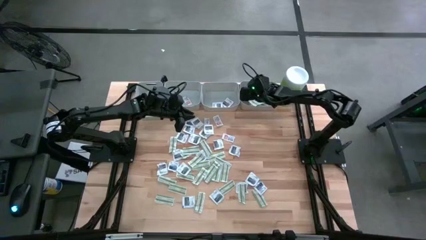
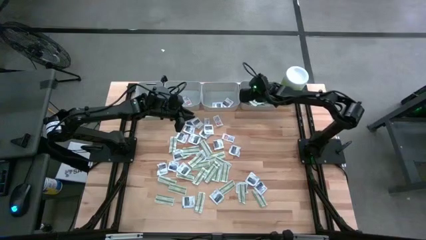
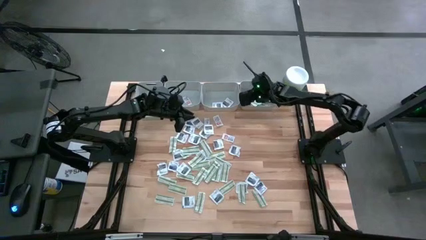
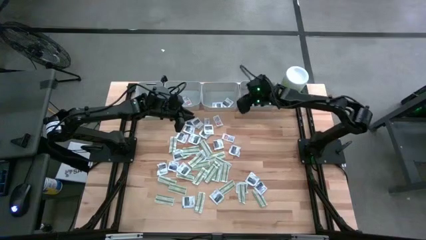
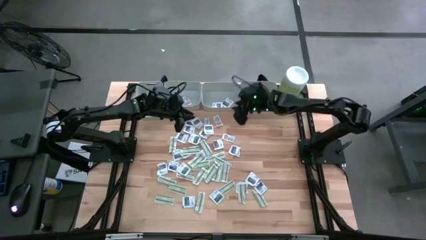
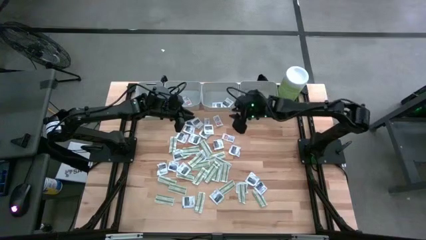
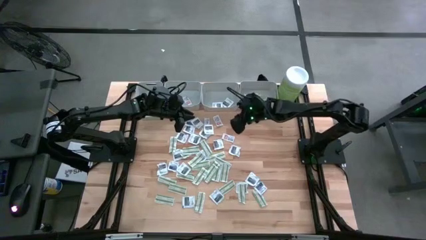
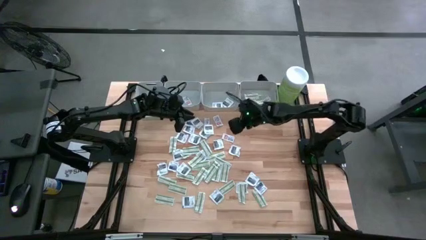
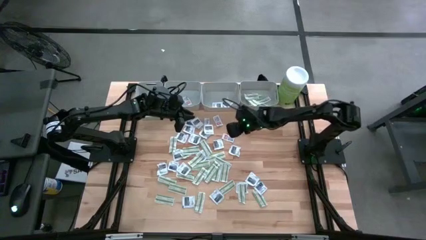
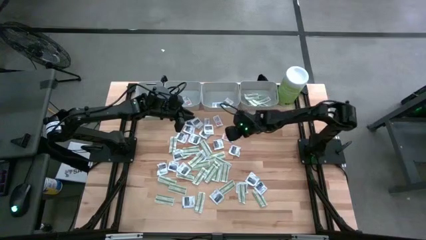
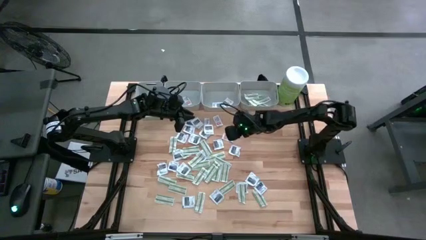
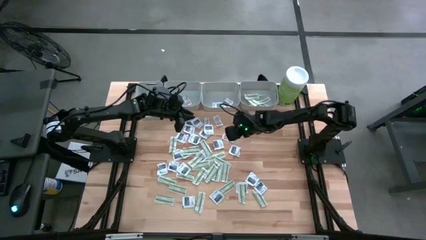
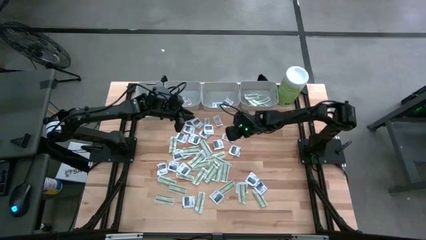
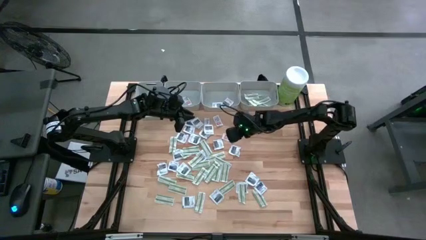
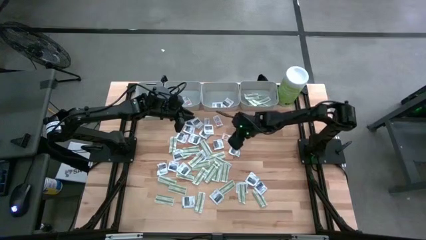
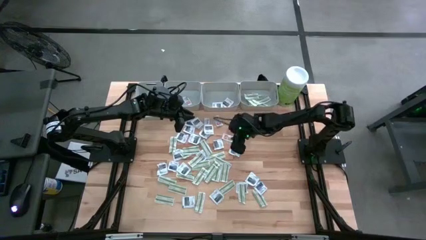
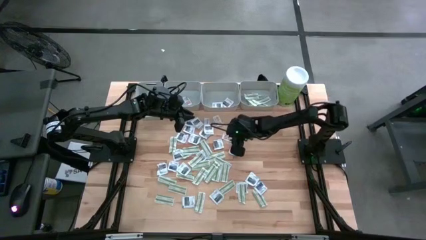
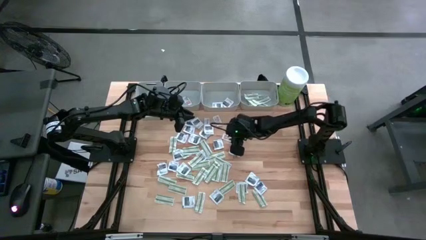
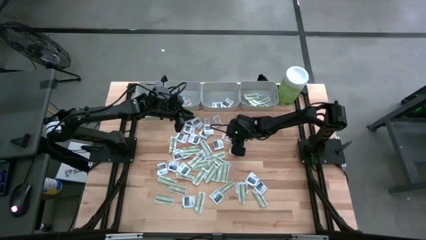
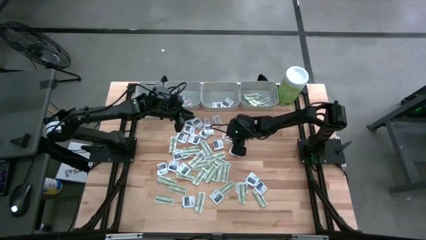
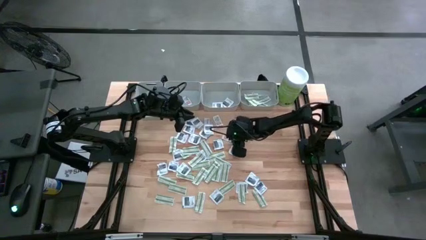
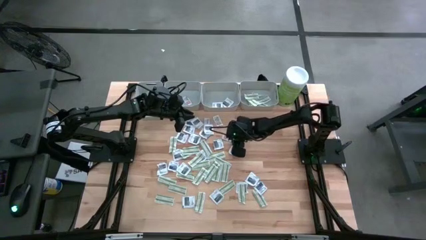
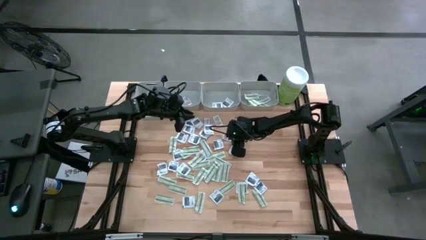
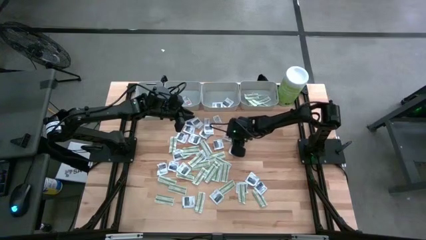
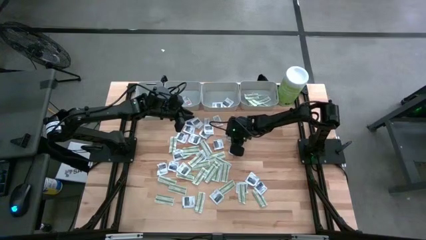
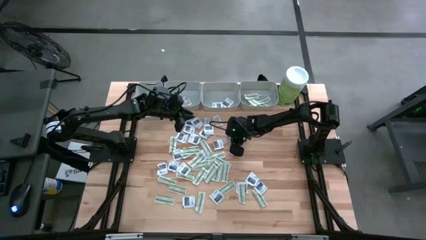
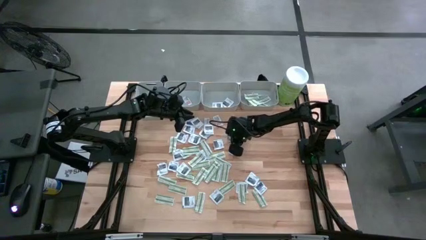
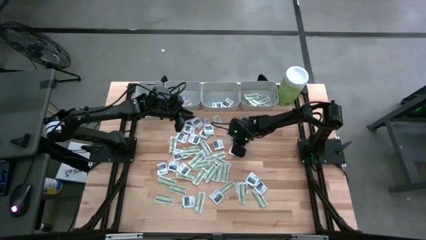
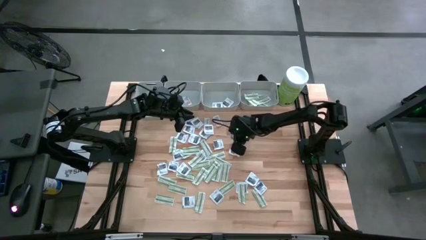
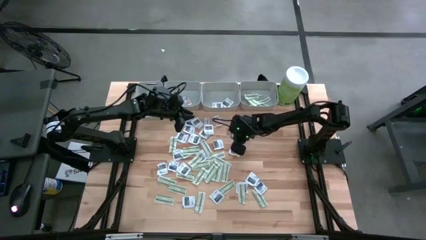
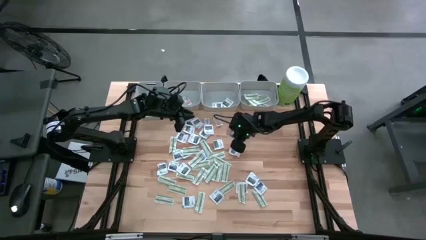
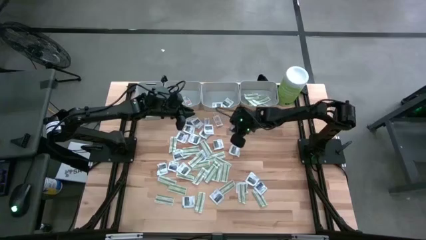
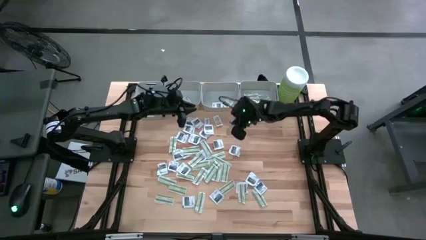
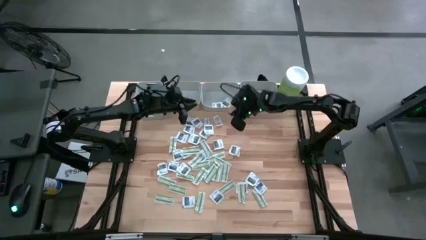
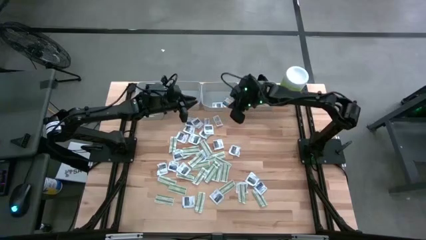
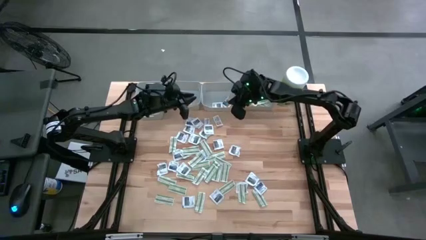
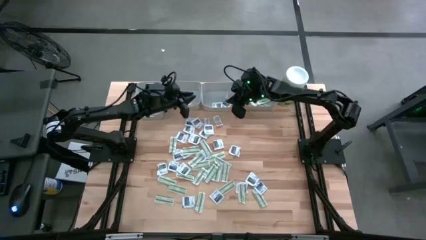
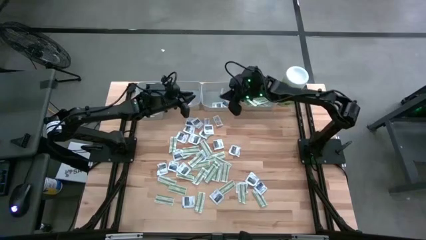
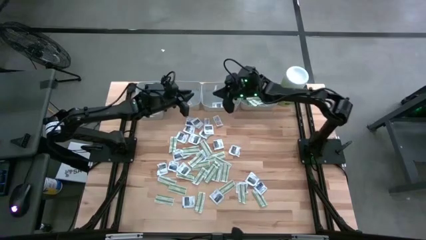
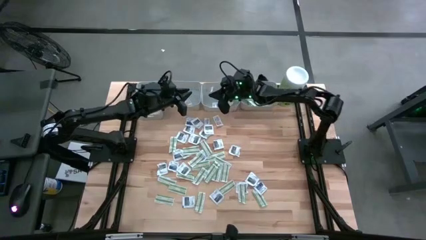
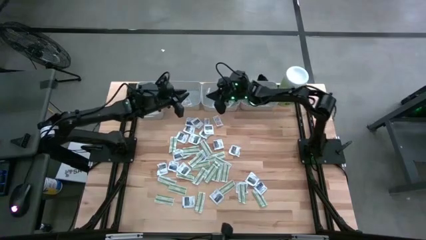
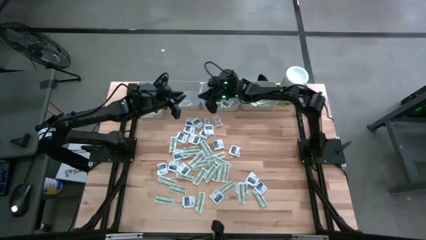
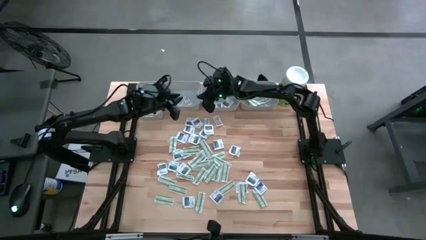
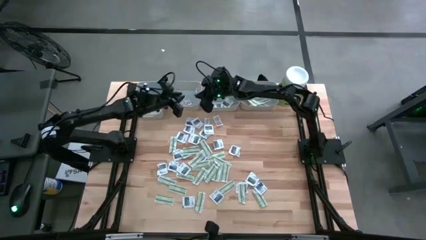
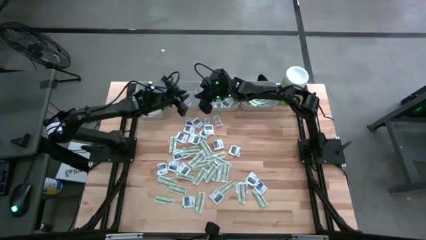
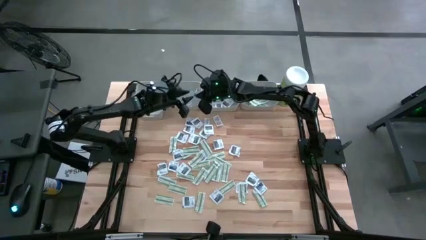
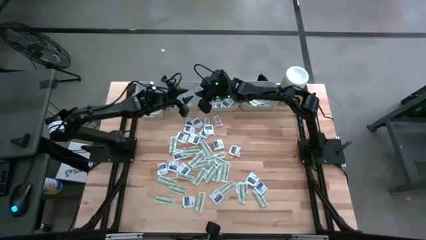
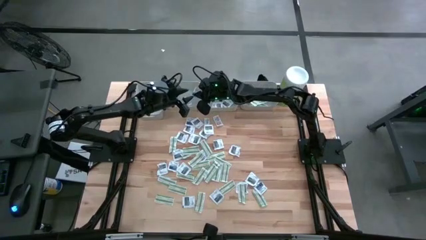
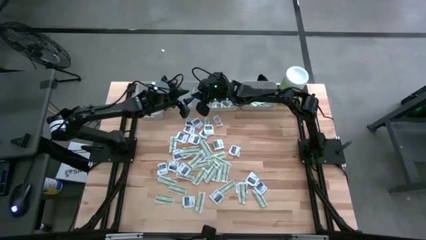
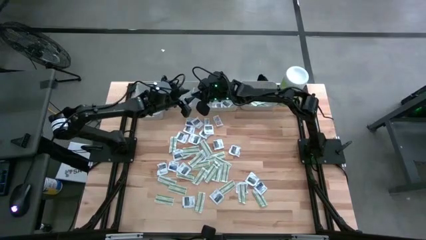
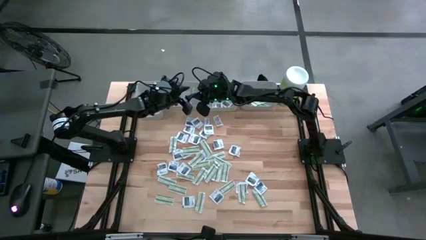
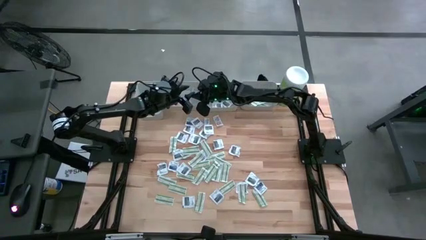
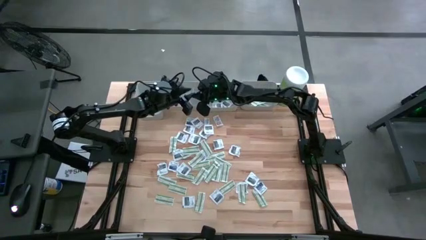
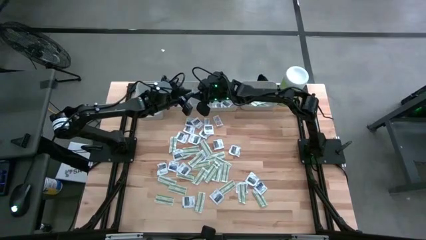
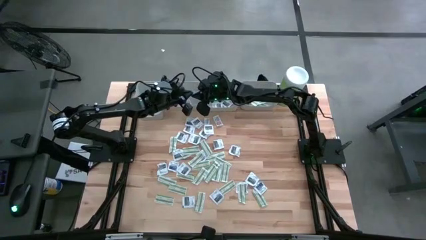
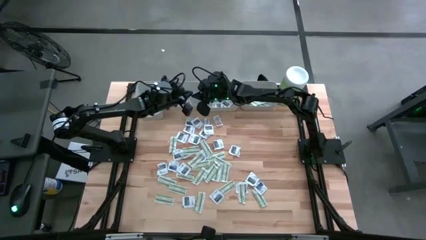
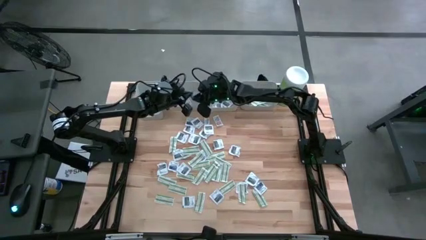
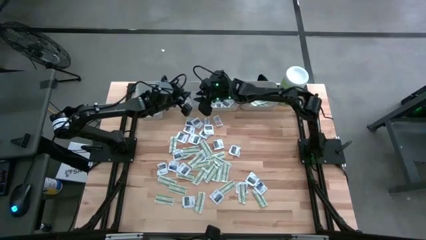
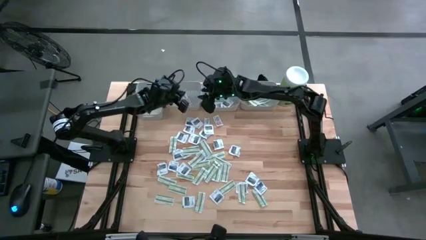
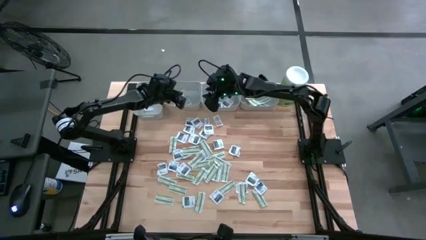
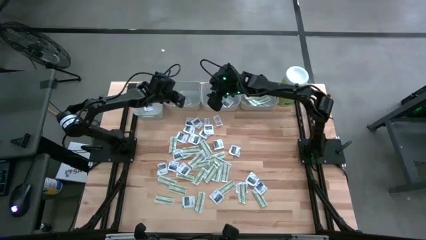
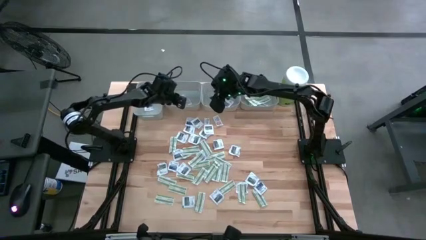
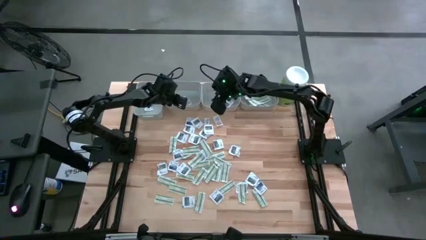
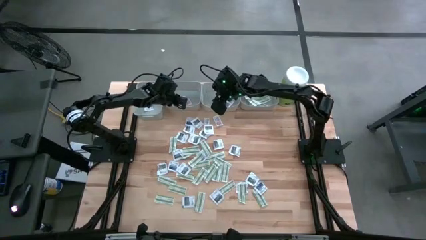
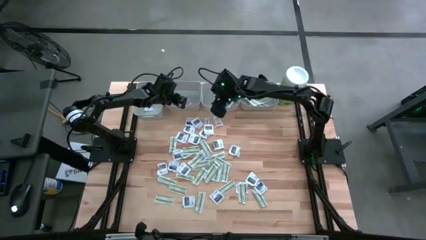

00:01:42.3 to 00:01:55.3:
Task: Pick & Place First Aid Supplies
Put the orange ointment pack into the middle left gray bin

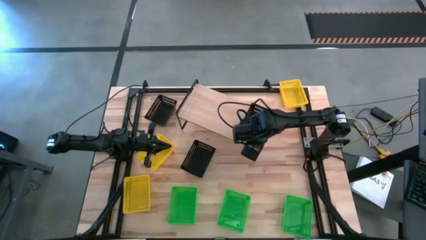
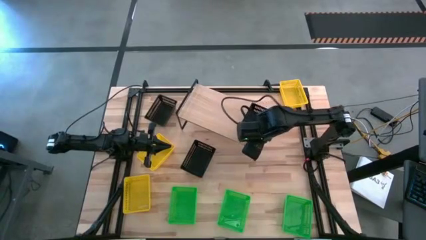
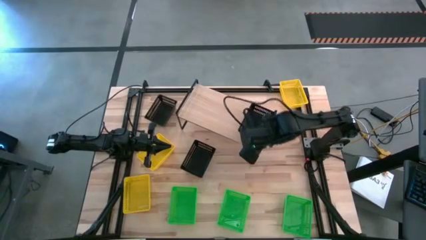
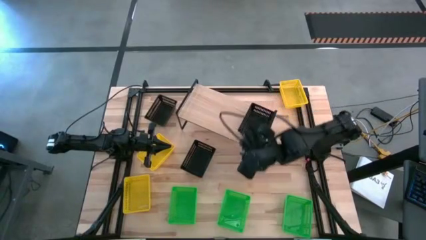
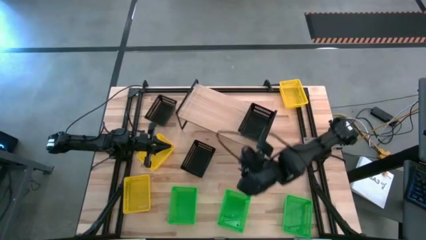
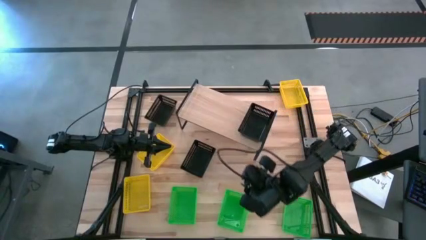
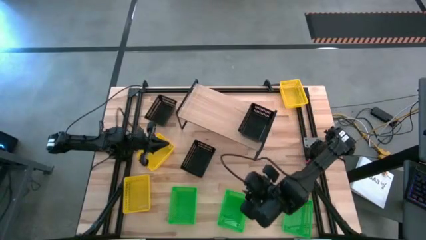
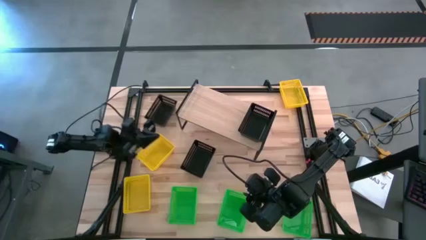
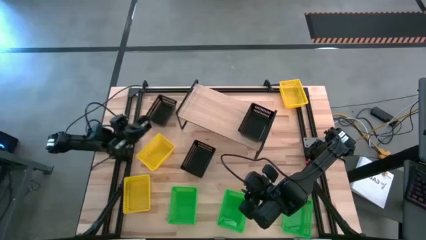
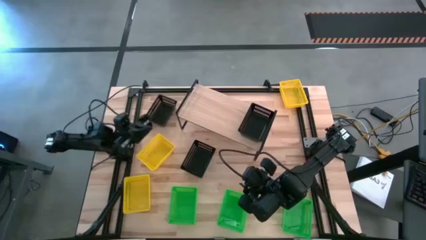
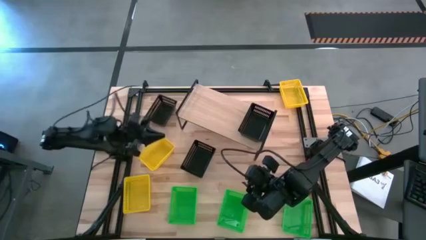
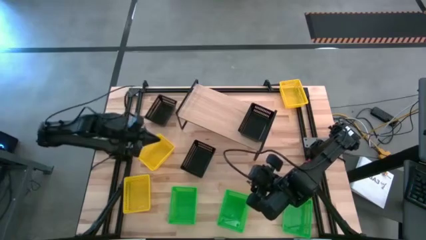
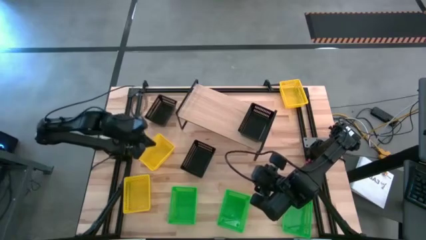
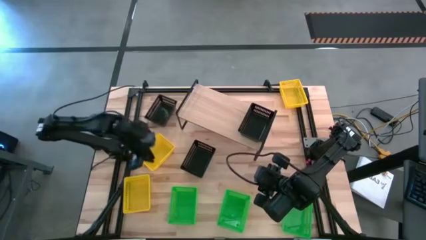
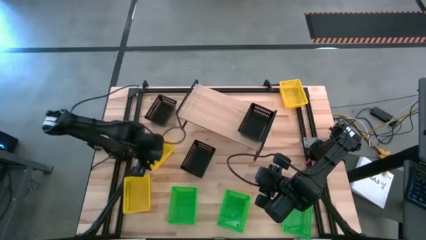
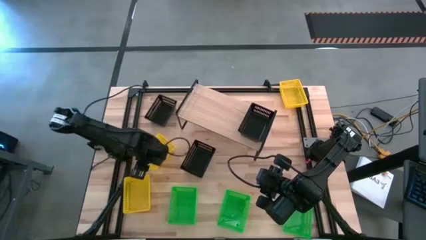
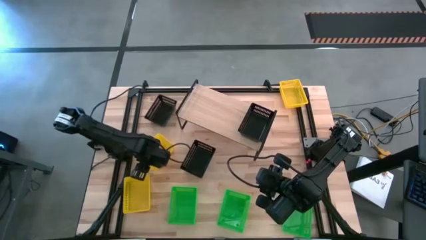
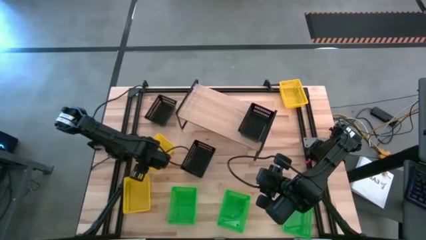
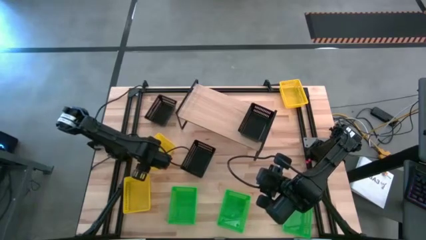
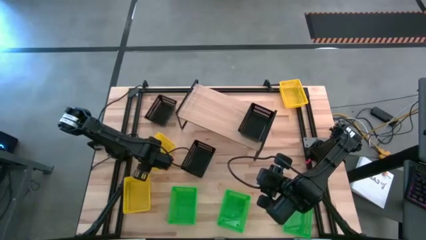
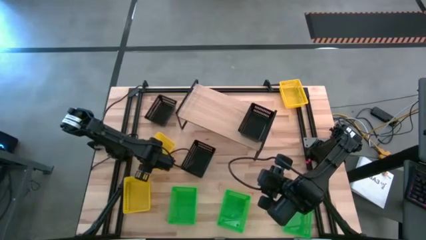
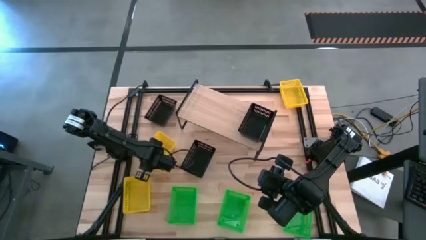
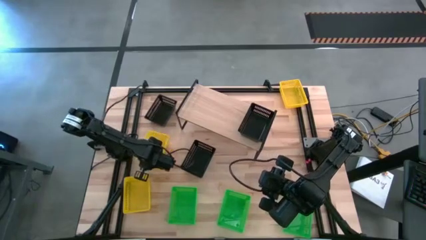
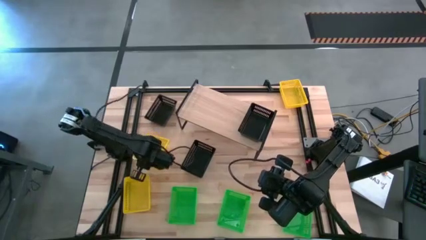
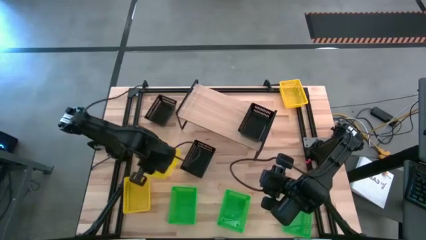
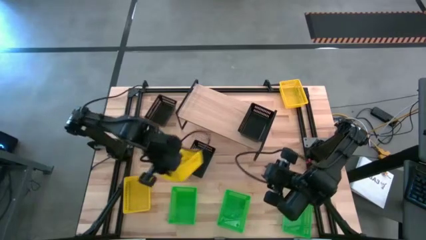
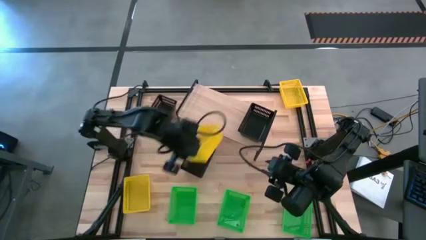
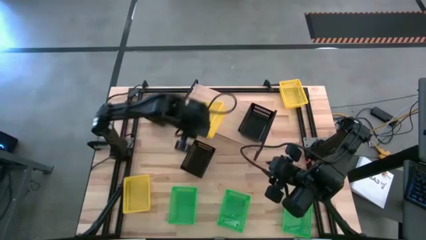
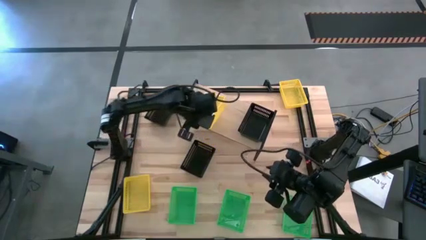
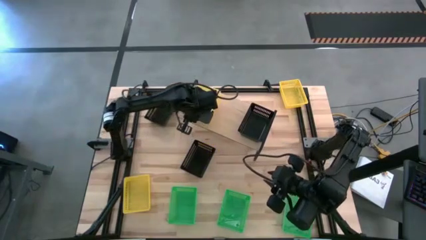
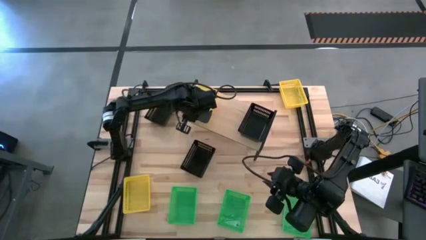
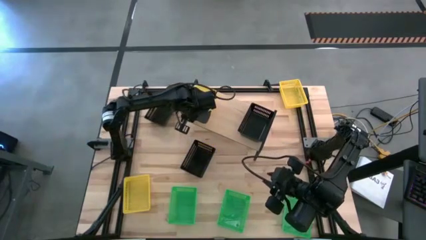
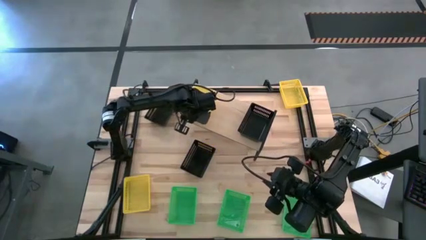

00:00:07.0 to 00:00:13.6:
Task: Stack baskets on shelf by color
Put the middle left yellow bin on the shelf
